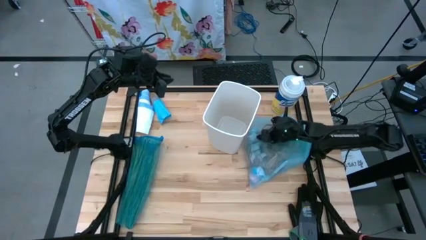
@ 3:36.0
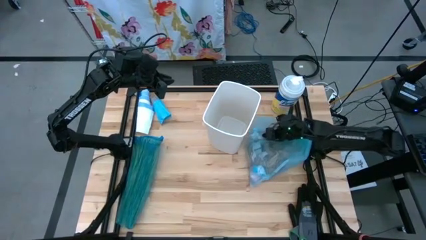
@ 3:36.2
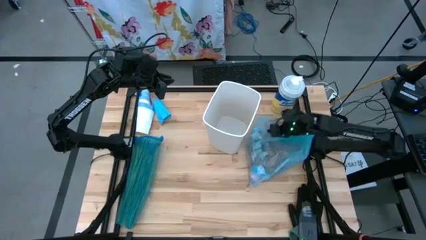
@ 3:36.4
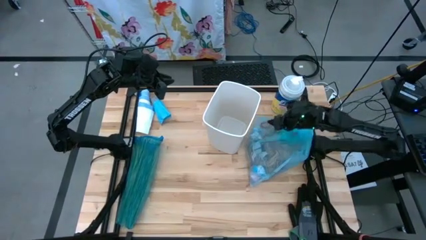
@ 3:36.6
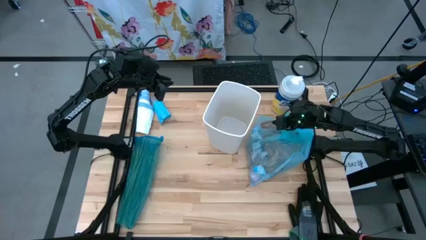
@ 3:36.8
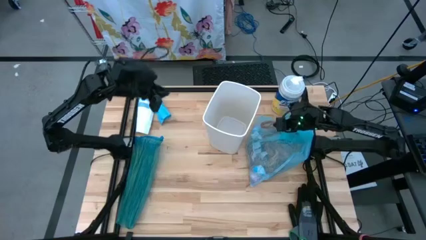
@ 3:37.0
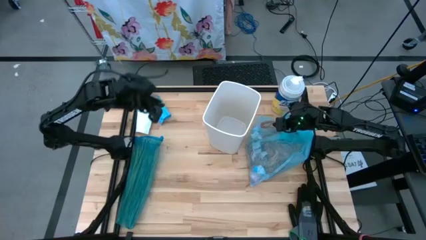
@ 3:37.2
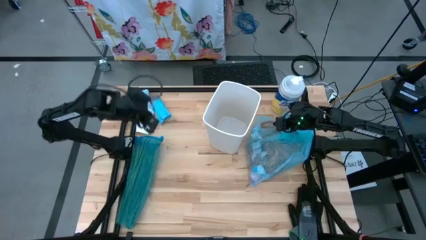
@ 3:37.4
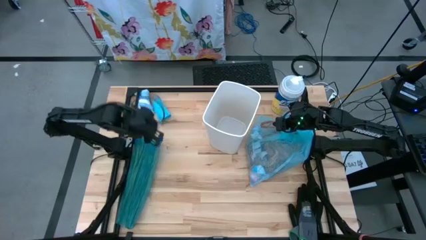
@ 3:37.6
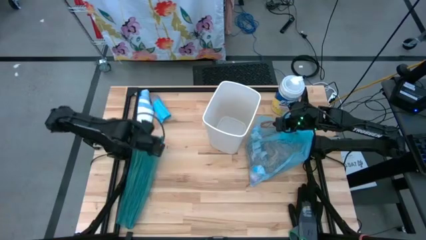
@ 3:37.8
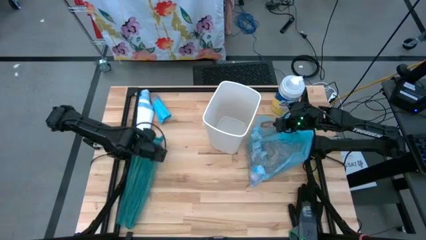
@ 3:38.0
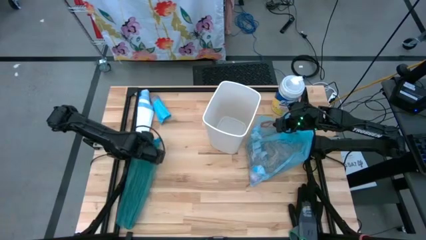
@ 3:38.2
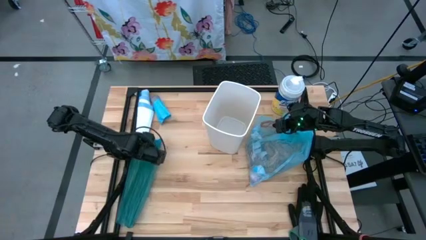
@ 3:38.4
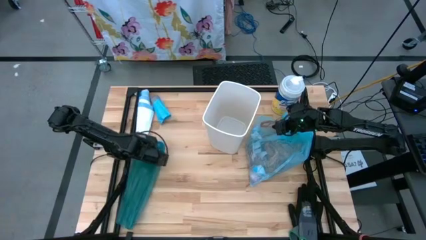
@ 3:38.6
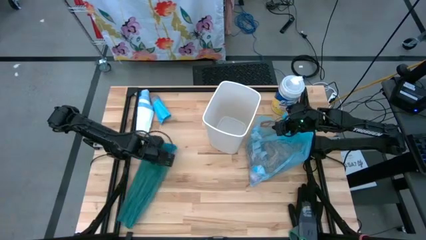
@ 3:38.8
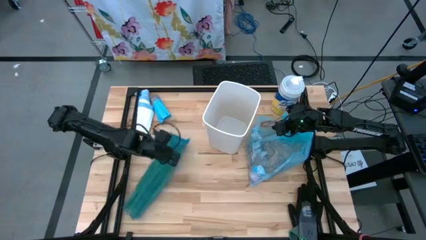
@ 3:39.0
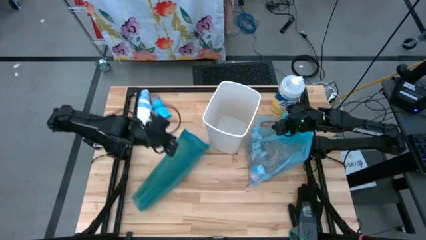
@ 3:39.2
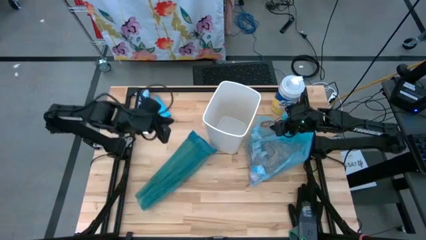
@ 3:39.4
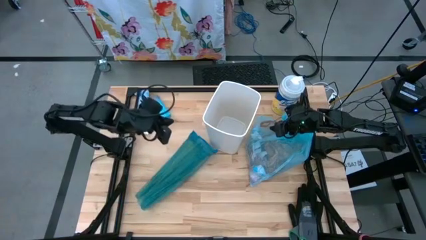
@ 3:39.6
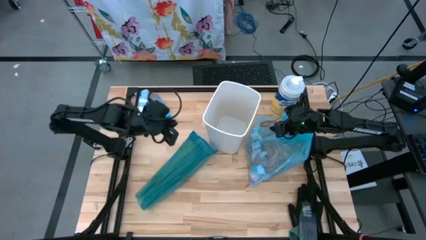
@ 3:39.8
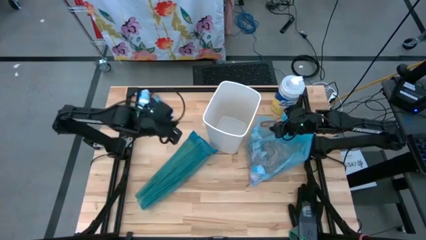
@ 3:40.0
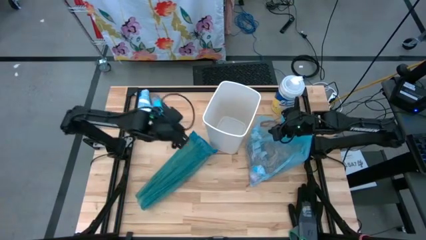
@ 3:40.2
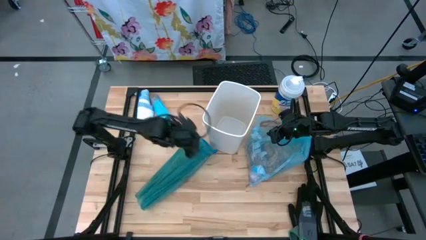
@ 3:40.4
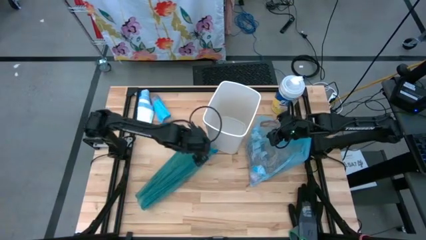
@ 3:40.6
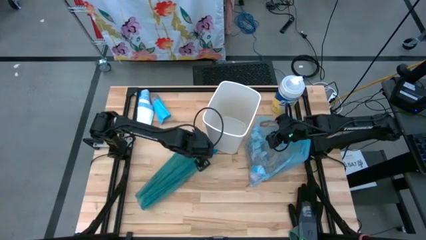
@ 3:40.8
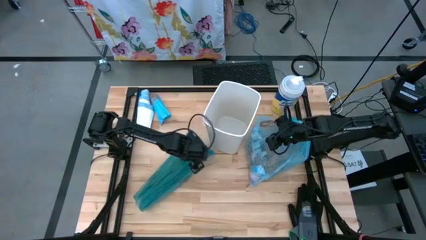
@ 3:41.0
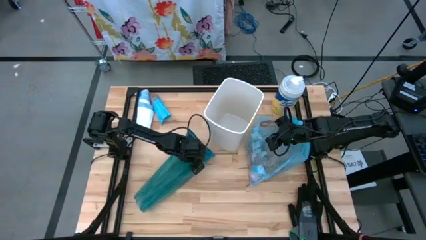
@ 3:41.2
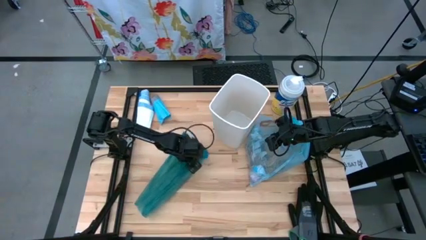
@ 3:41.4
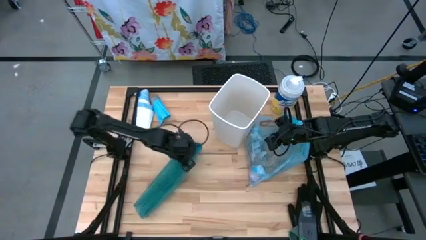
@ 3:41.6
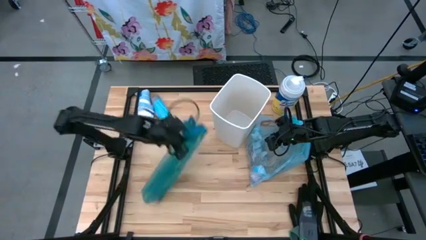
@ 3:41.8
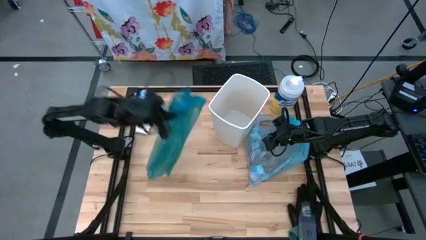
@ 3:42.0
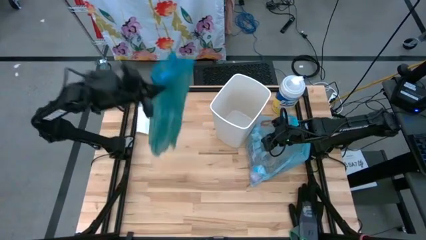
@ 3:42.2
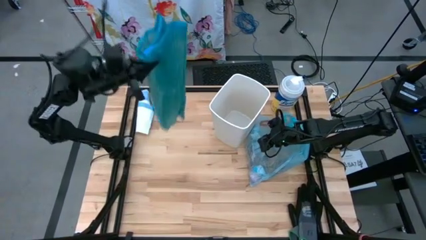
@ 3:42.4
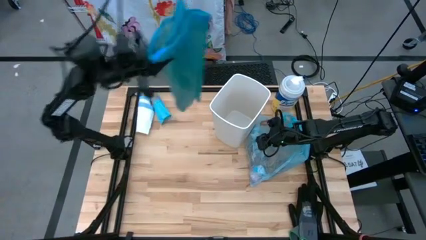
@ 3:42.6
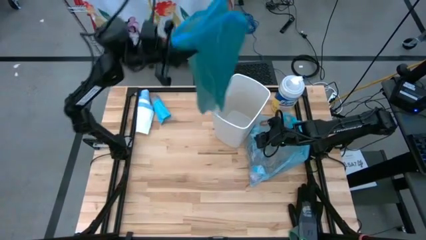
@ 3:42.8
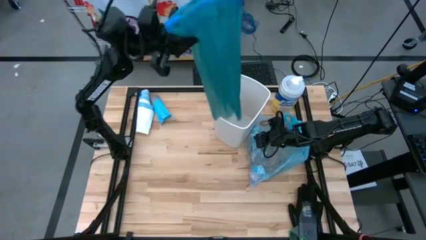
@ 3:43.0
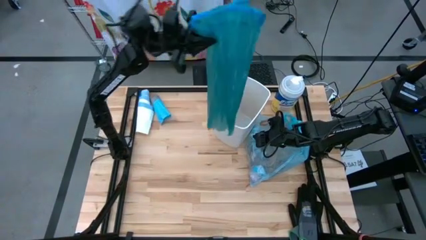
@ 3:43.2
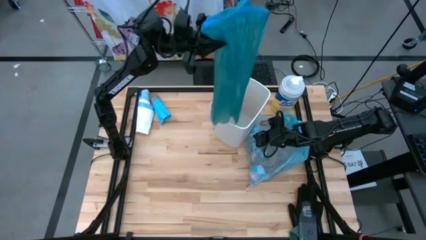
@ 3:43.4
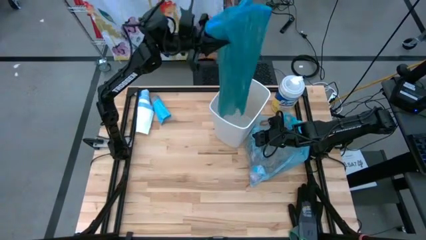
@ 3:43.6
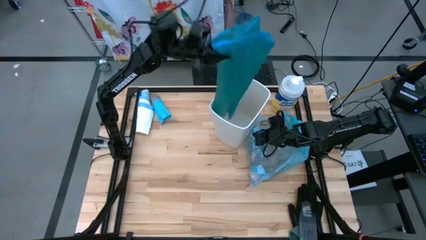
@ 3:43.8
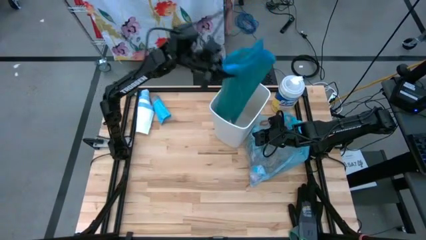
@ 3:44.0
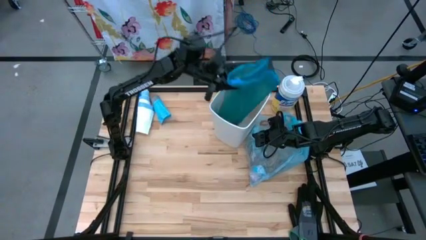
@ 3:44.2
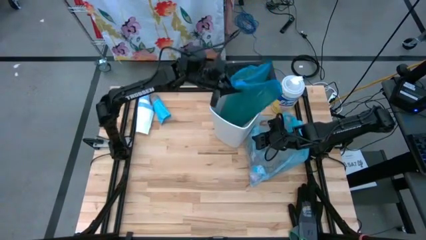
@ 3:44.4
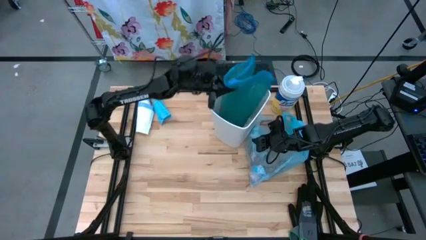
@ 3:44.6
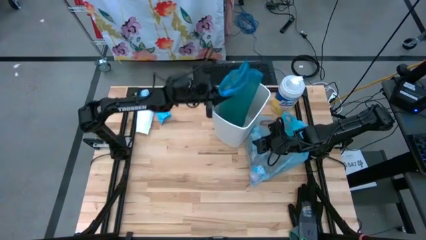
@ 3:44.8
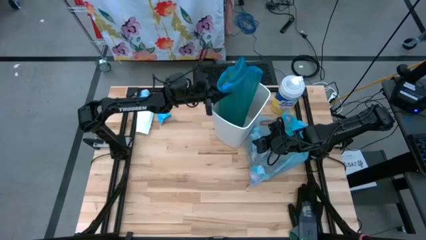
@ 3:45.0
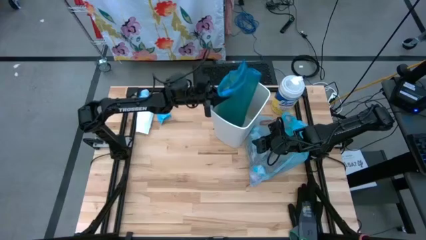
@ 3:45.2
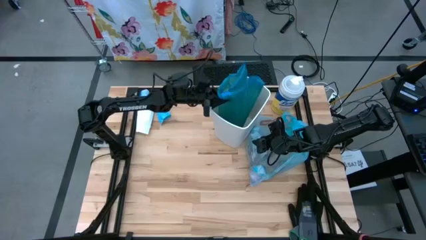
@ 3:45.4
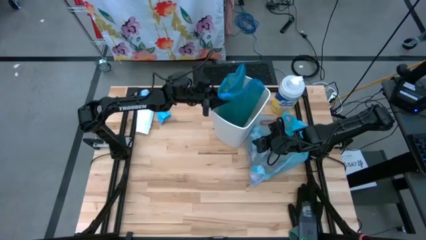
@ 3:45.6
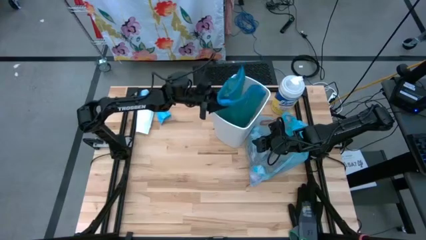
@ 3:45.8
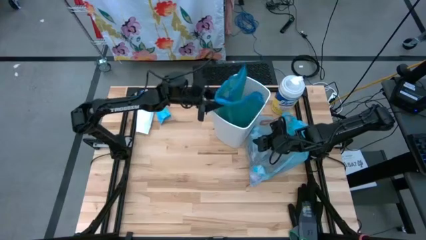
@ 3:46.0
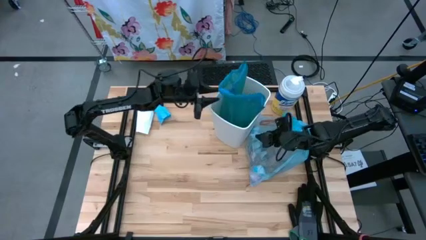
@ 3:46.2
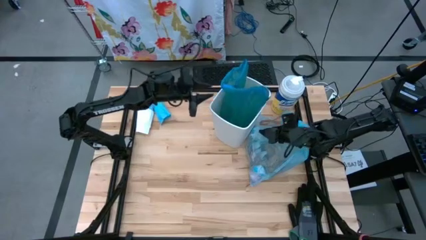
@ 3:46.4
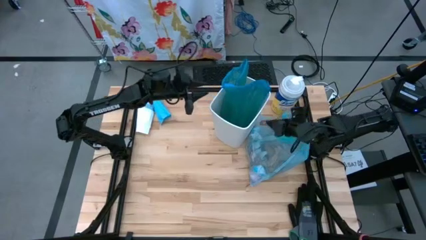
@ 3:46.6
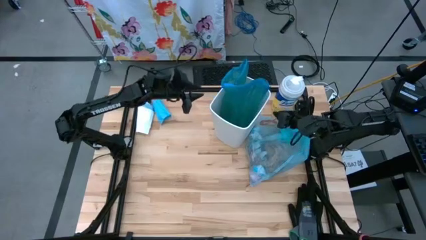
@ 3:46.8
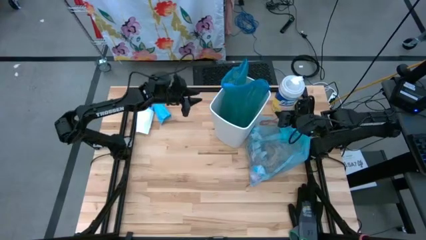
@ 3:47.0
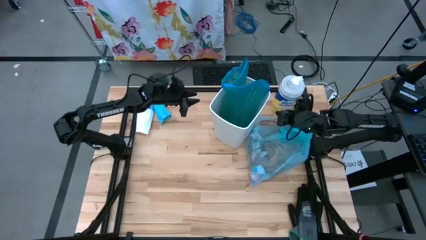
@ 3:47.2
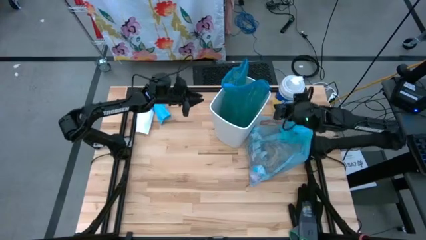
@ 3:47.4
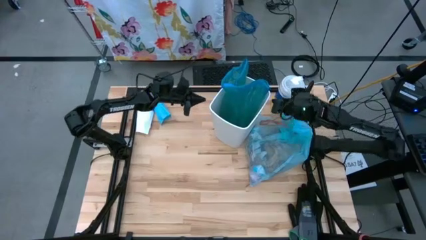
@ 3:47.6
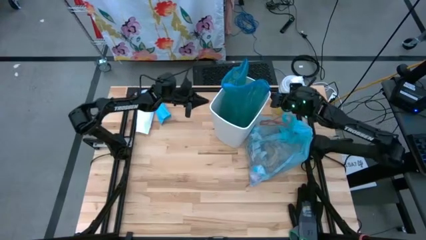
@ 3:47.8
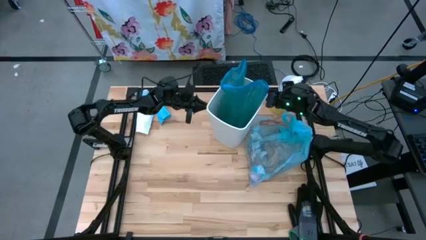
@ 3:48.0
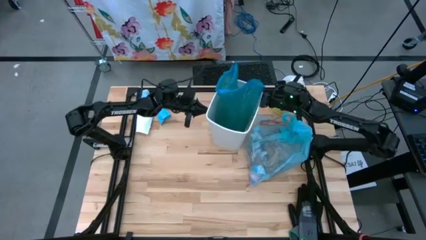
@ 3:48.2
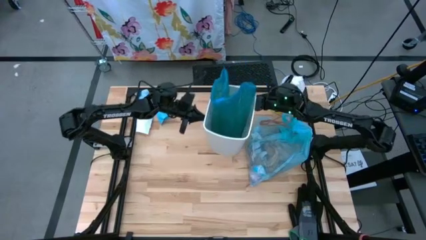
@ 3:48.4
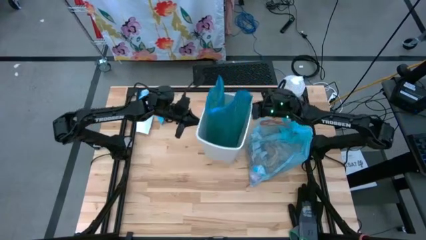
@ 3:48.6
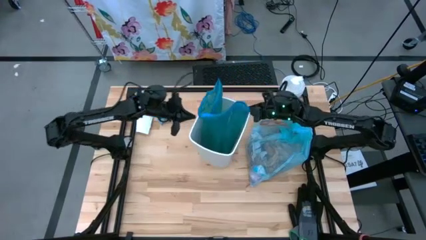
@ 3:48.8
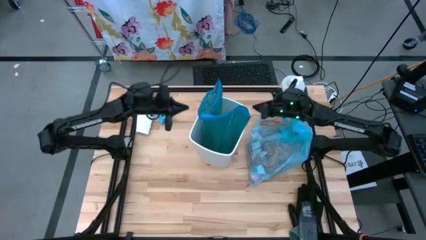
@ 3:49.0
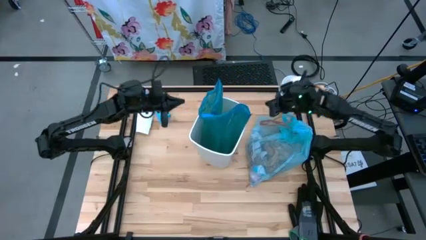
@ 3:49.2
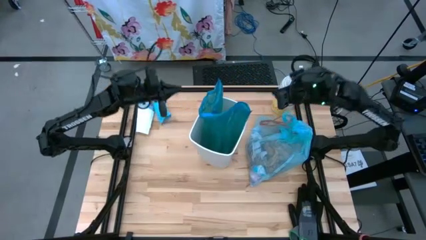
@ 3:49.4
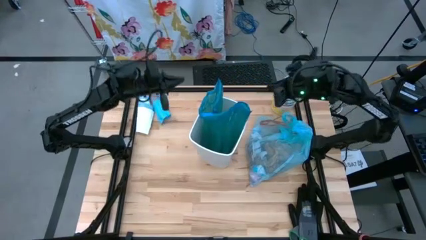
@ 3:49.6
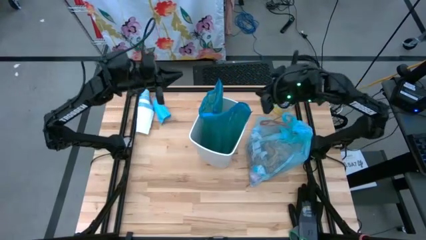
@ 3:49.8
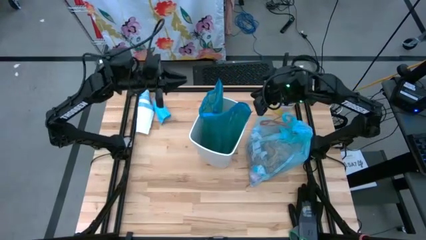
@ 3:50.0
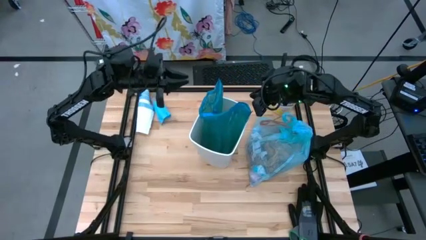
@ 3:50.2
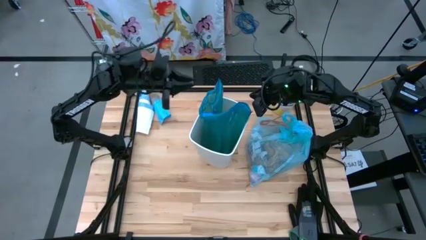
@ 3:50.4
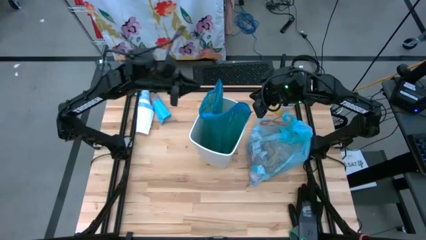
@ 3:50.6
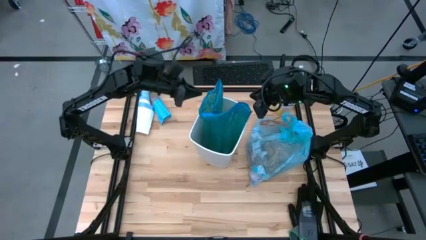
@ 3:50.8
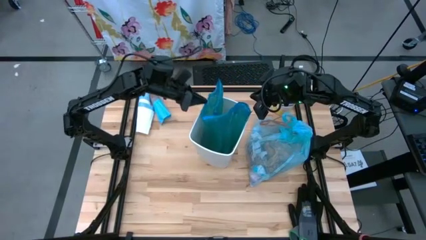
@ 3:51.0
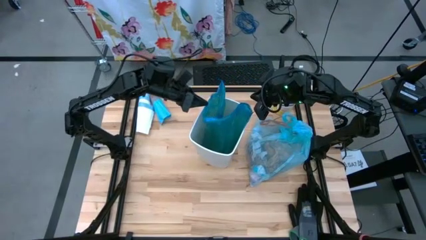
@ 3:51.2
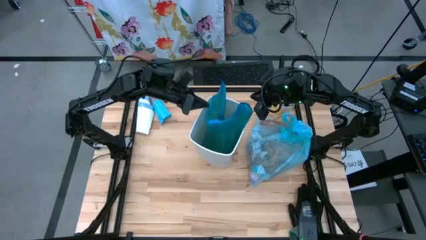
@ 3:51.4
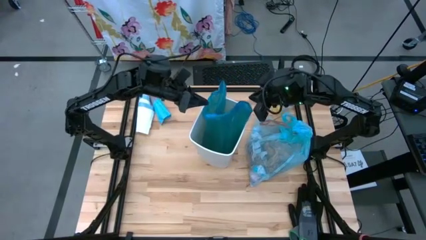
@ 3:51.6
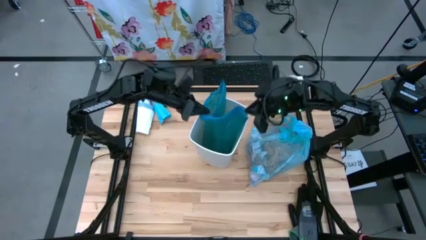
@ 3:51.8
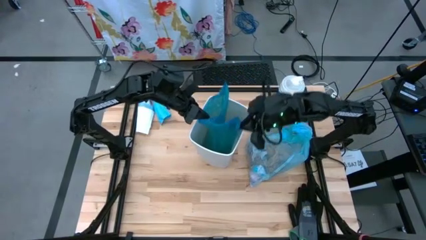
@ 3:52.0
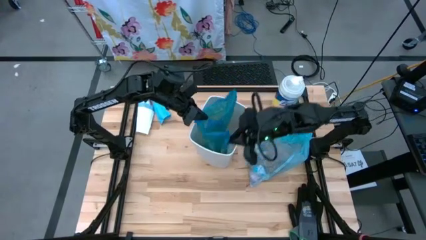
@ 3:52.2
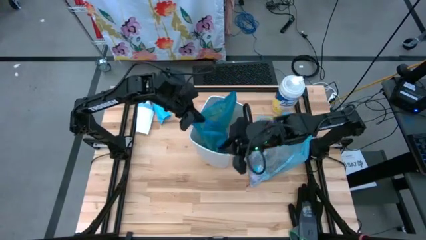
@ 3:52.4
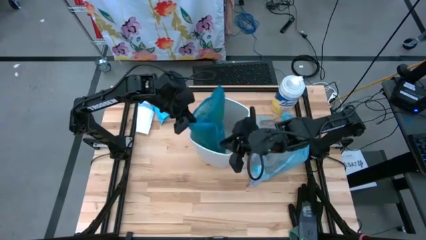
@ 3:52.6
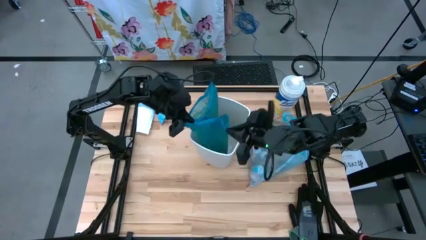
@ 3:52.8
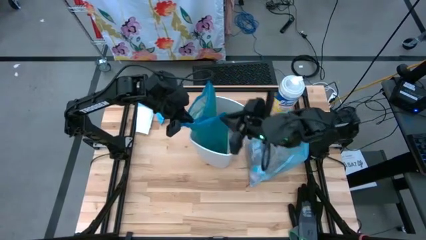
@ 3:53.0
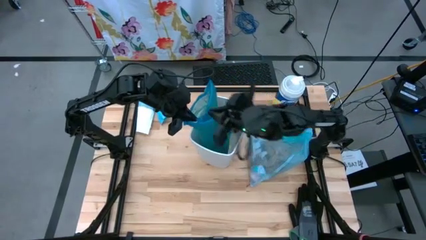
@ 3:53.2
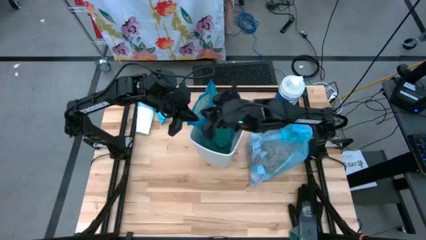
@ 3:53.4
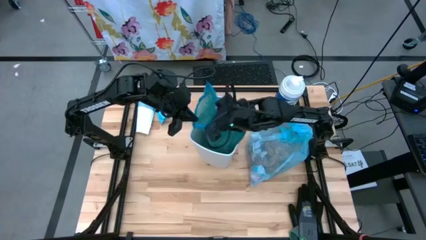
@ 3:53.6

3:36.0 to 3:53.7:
Task: place trash/remove bag and relplace
Insert the blue trash bag into the white trash bin
